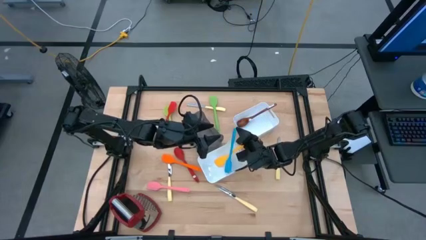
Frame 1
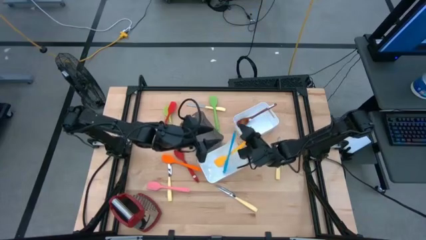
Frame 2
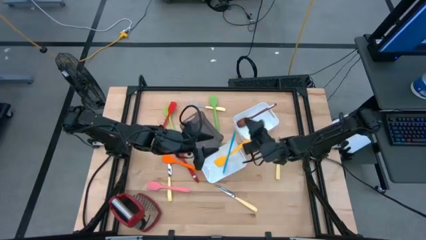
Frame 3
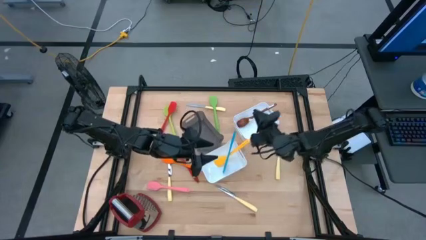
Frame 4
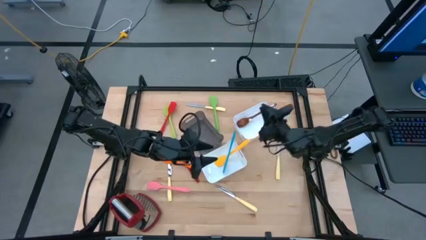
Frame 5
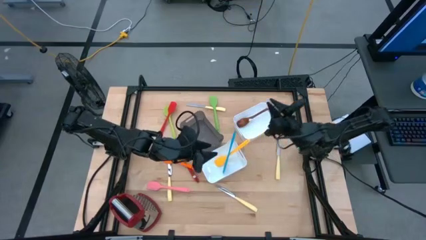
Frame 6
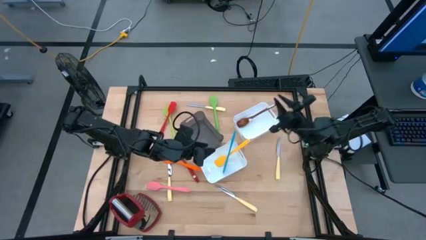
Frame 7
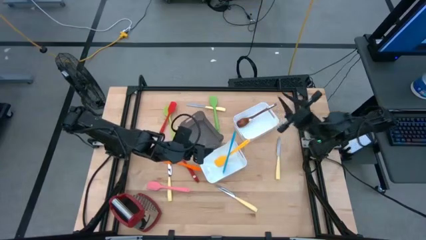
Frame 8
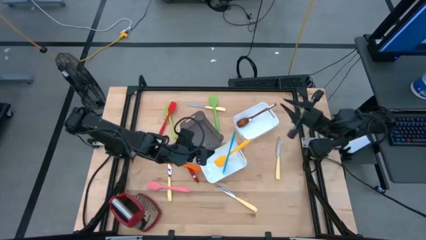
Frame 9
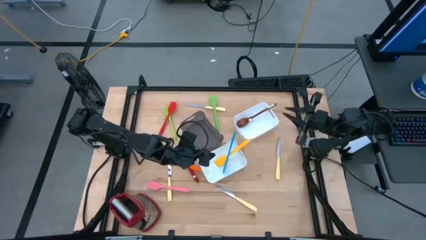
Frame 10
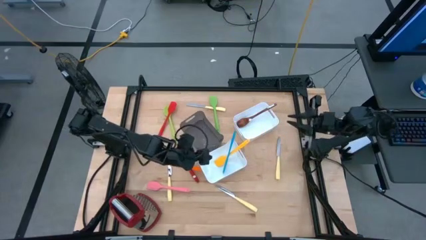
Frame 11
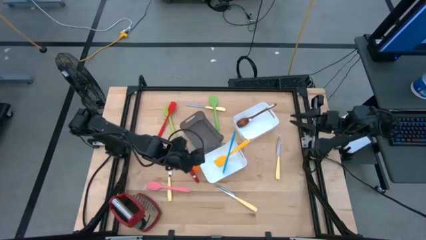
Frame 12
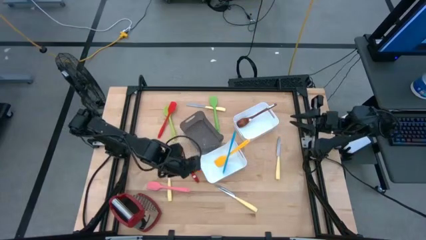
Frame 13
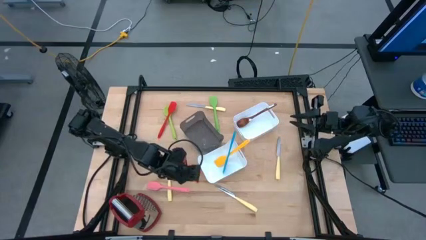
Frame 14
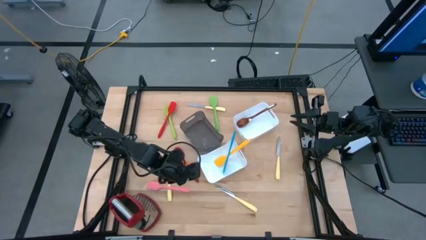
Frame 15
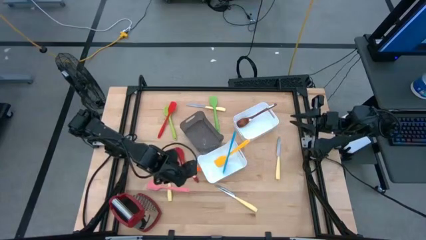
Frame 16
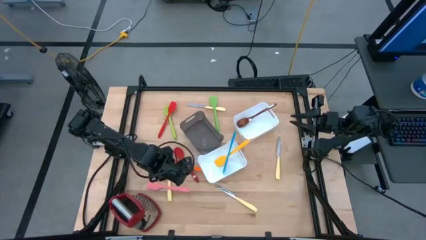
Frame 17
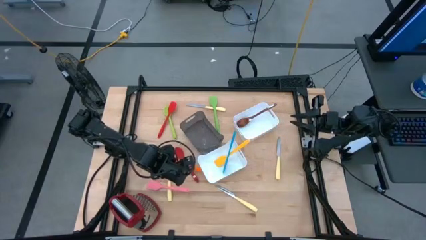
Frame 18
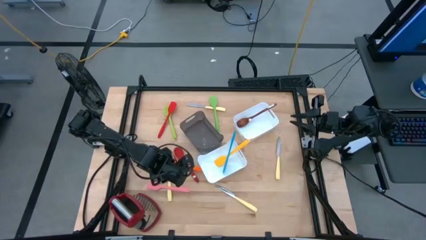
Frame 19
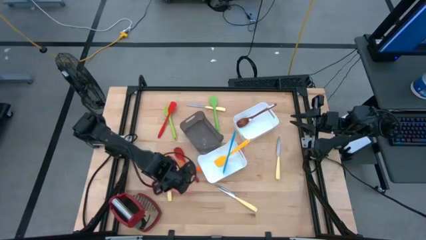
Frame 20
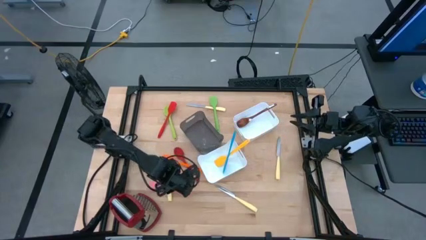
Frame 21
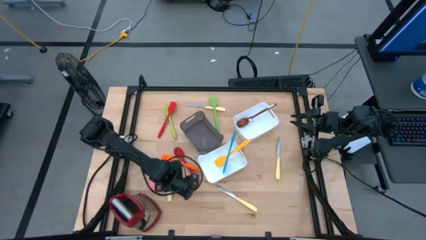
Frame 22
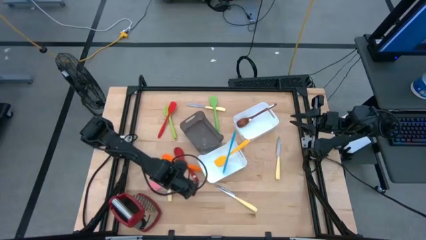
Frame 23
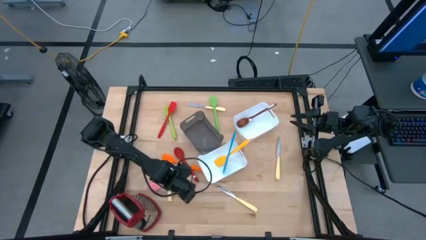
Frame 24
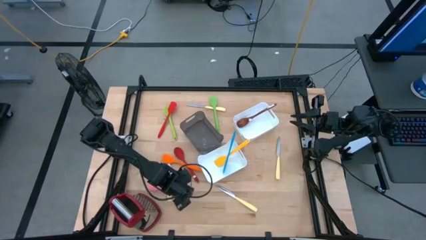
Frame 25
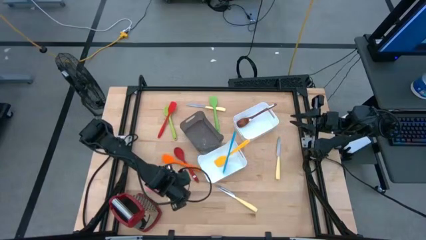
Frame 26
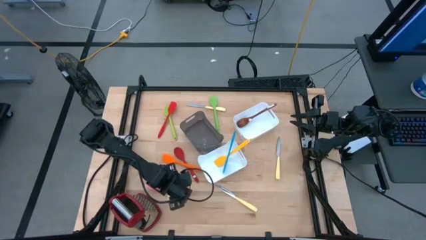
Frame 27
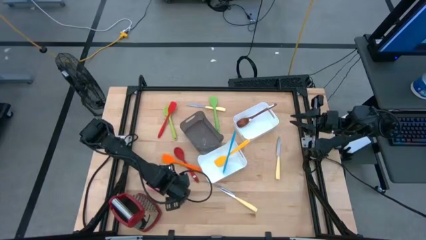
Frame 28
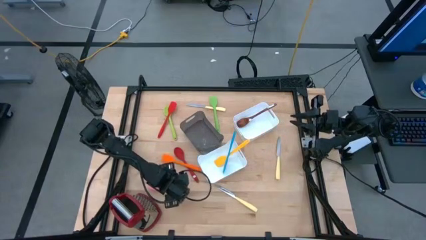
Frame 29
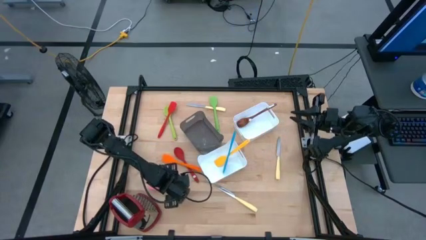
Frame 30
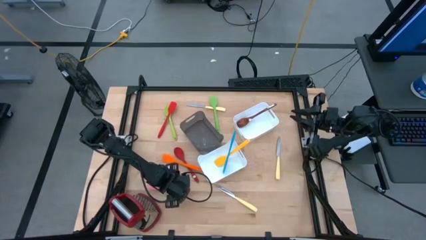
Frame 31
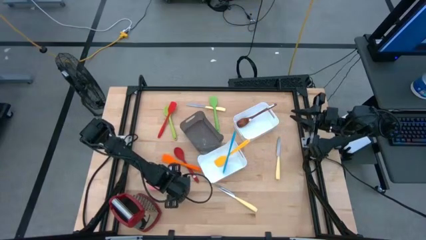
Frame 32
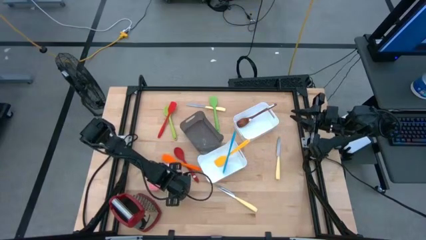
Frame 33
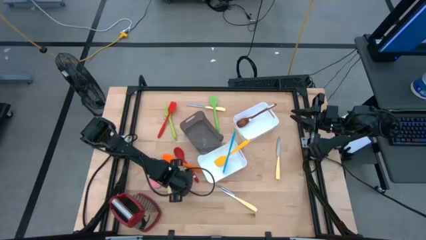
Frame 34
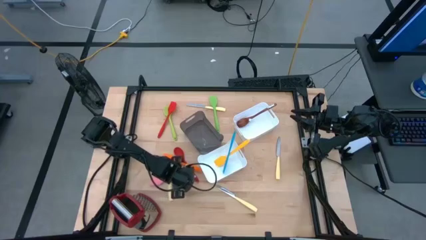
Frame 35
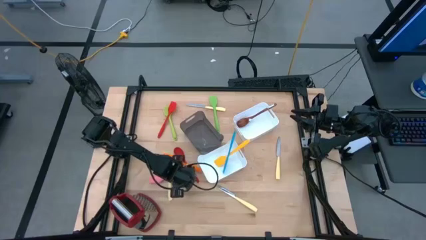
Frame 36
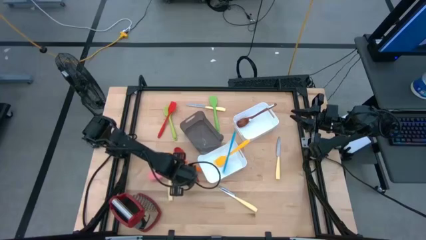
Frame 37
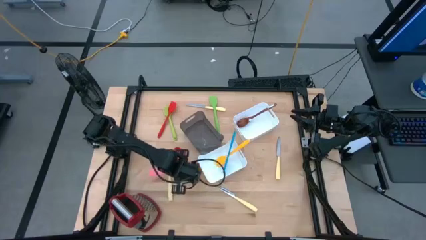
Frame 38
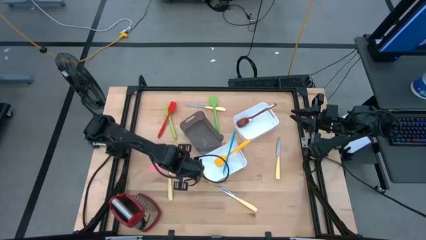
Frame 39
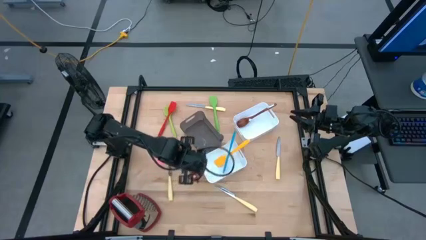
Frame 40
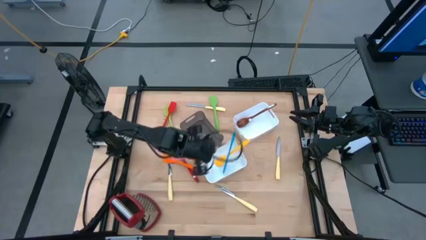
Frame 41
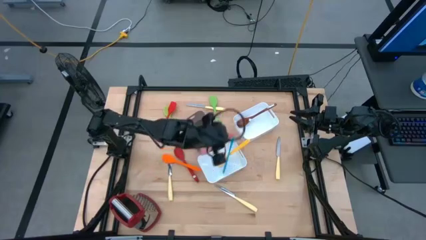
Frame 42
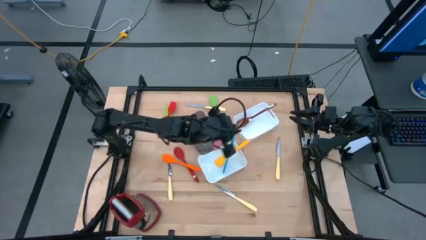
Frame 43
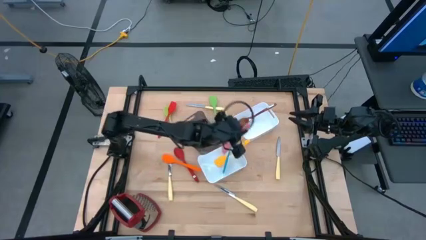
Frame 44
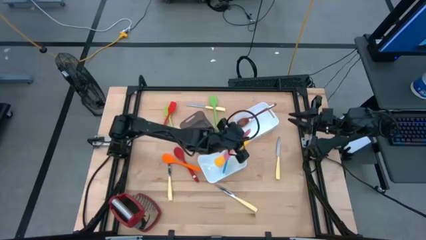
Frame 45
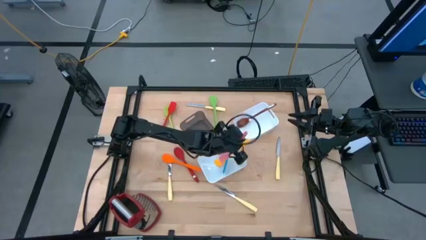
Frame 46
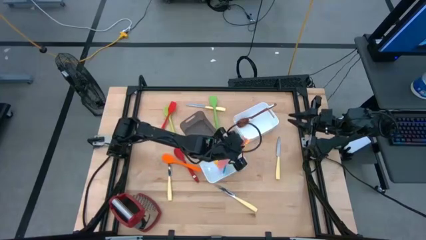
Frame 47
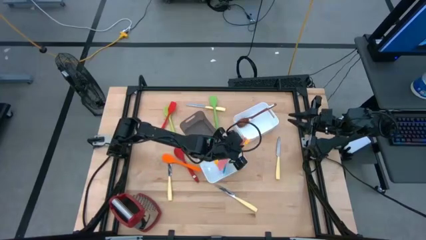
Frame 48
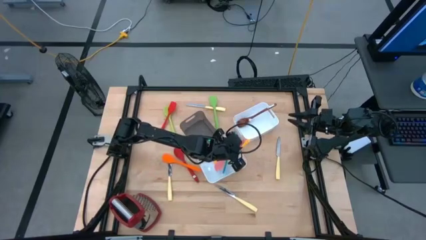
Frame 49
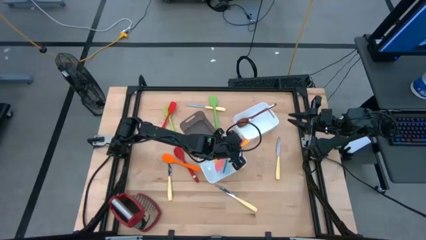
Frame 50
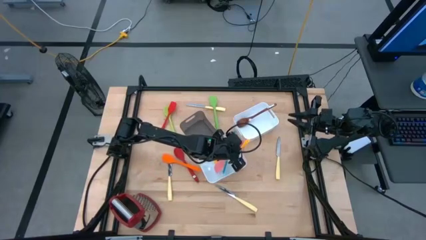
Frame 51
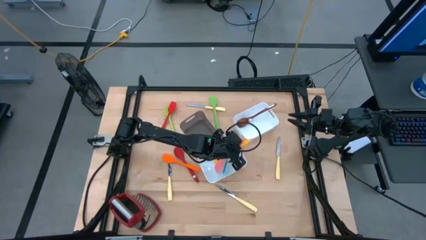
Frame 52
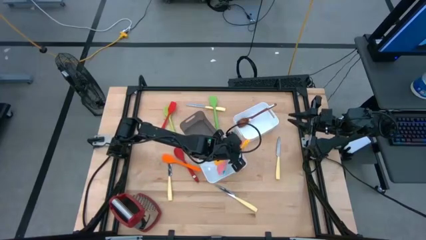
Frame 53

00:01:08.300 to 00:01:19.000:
Task: Pick & Place Kitchen Items
Put the pink spatula into the bottom white bin

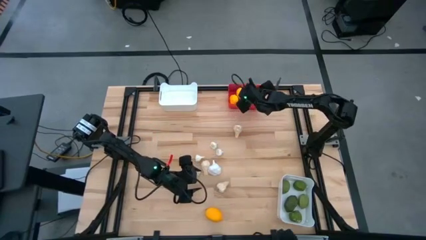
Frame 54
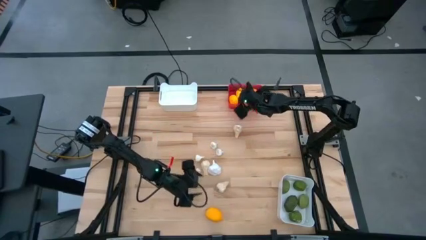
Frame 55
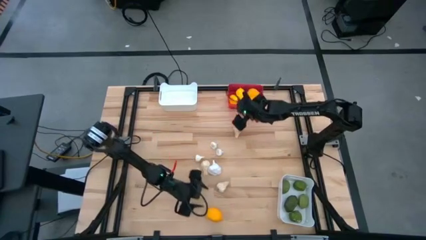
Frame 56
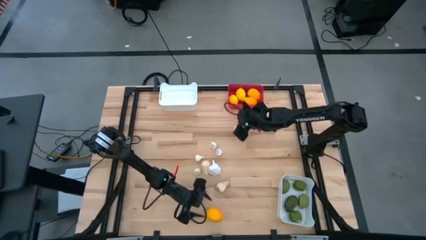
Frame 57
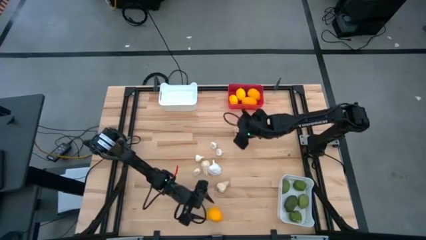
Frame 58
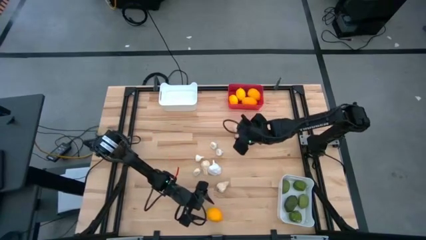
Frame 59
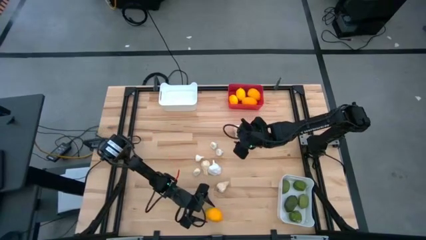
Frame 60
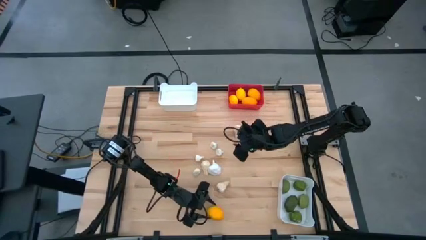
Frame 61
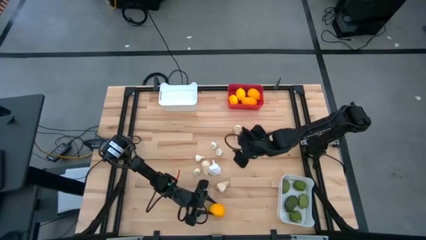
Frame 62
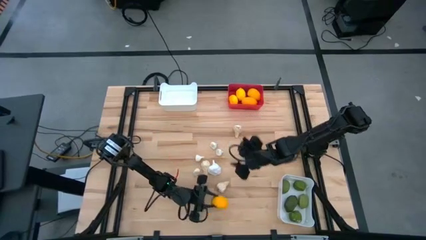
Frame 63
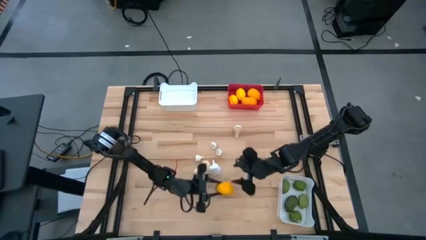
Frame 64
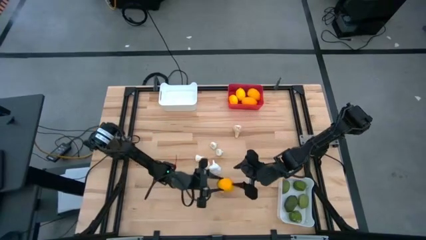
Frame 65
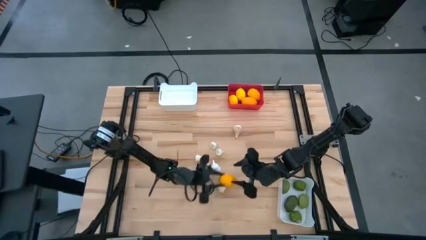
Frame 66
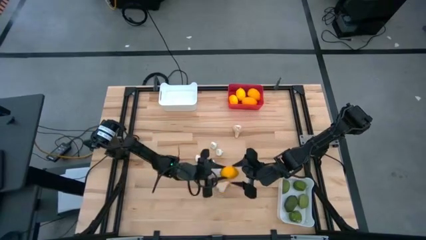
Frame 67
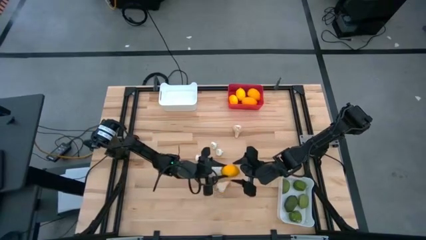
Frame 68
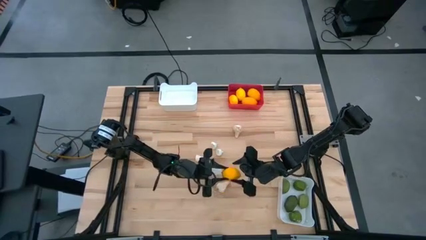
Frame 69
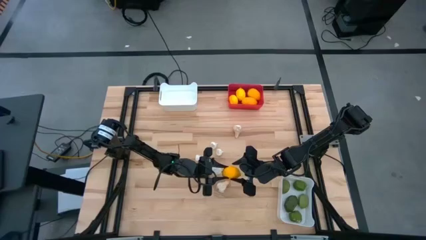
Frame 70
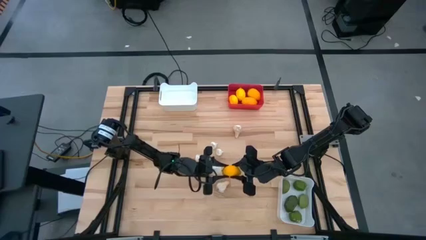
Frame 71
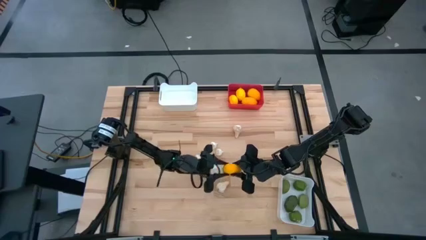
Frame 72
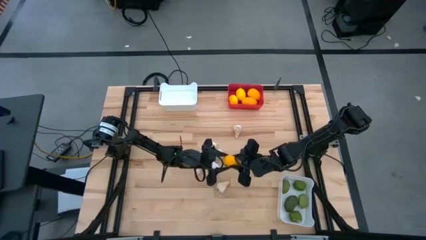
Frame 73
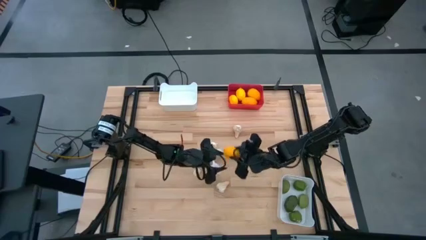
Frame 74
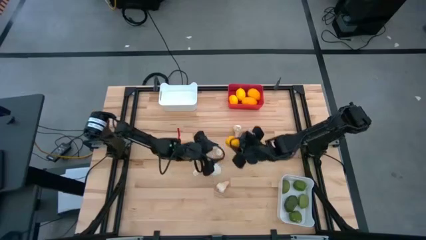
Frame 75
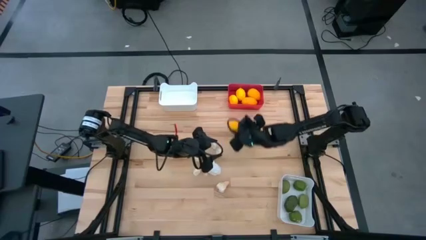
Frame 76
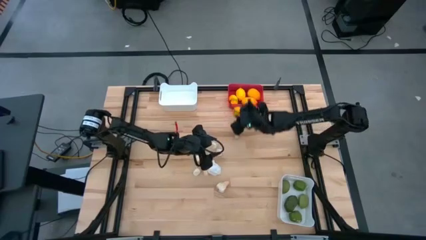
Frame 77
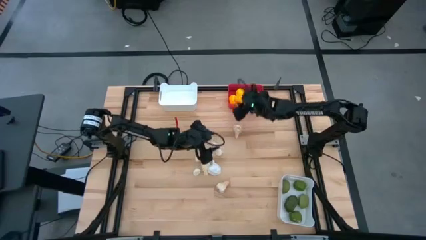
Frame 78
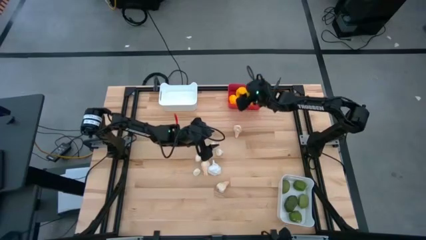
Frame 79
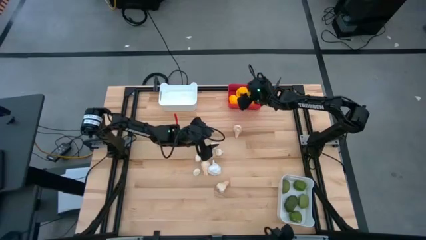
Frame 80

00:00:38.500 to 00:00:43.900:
Task: Sort produce into baskets
Put the yellow lemon into the red bin
